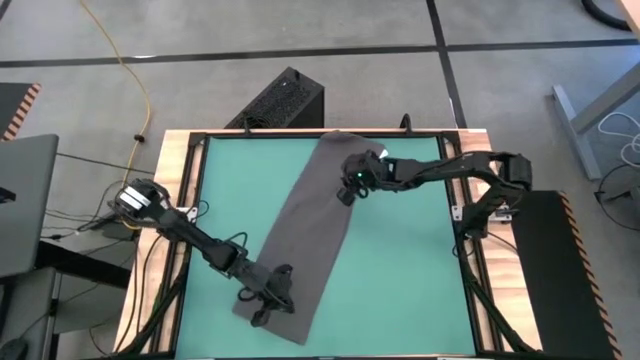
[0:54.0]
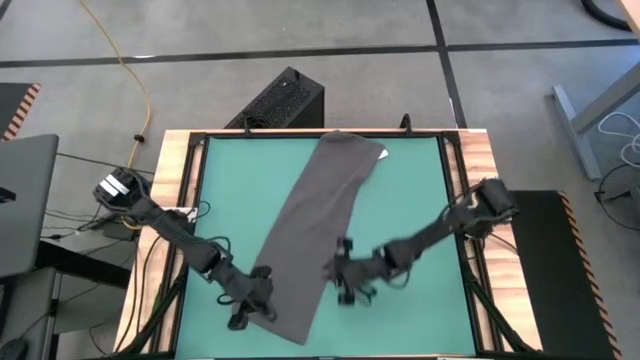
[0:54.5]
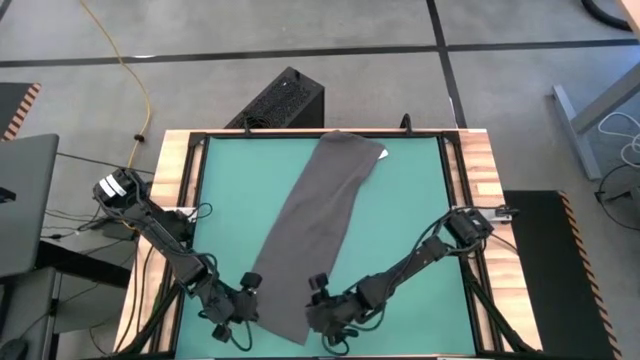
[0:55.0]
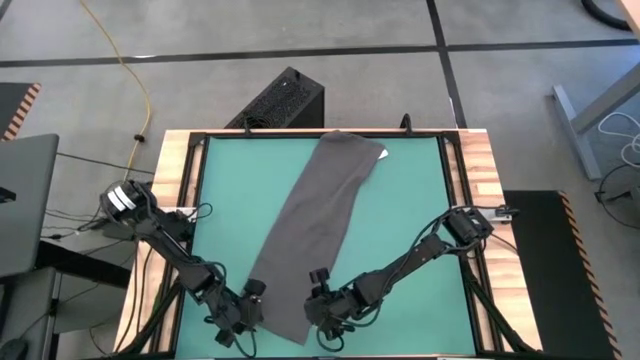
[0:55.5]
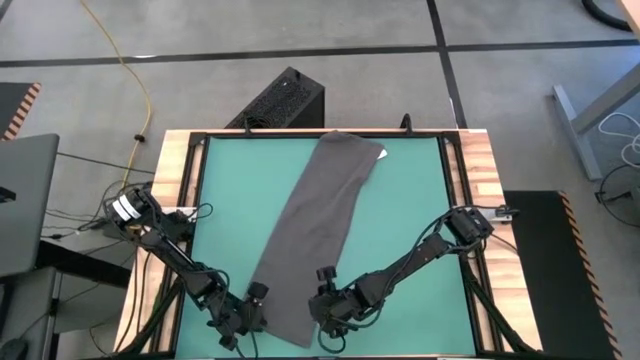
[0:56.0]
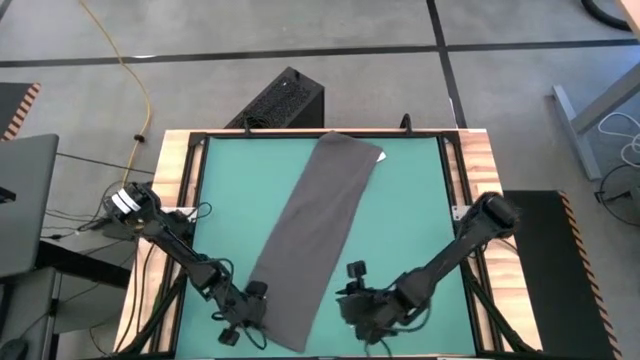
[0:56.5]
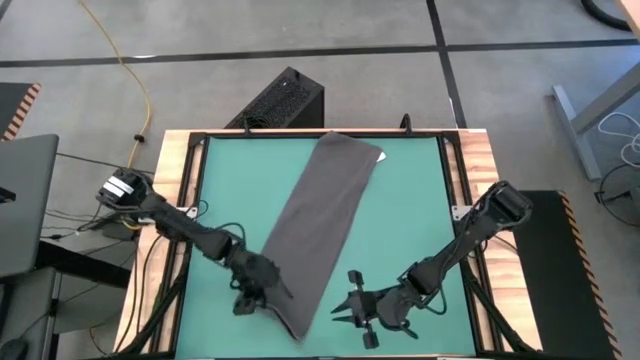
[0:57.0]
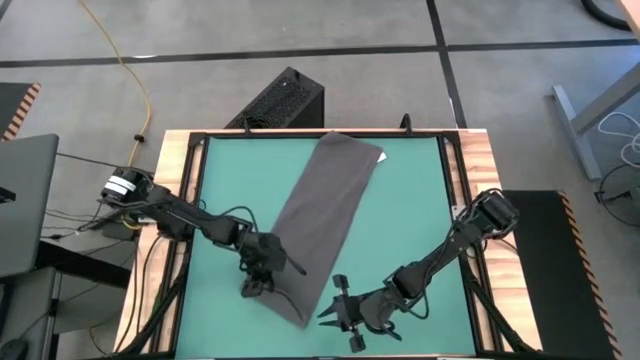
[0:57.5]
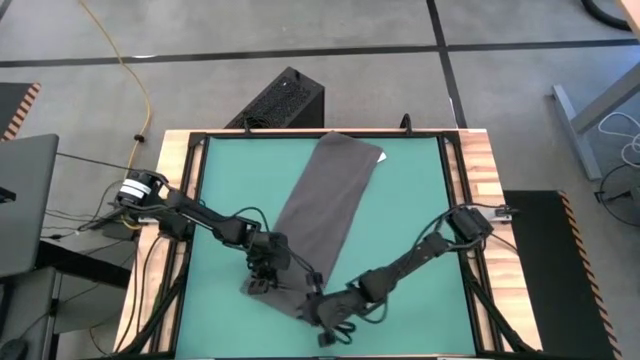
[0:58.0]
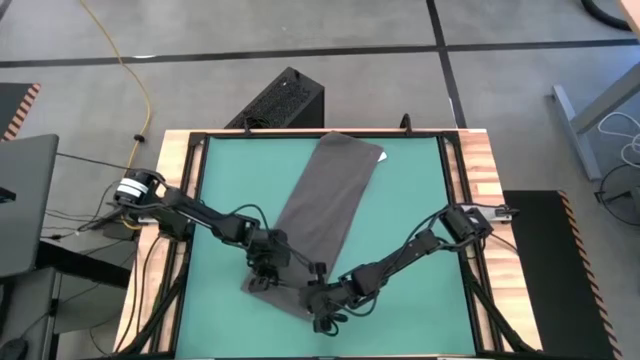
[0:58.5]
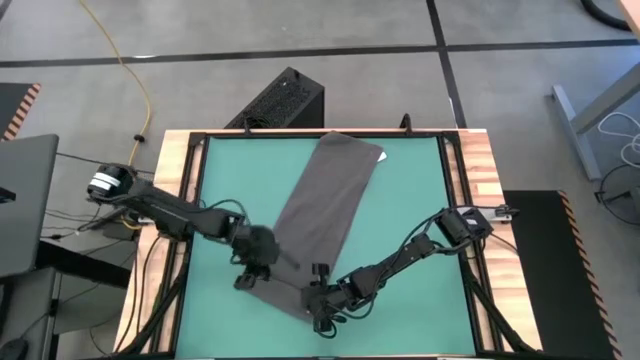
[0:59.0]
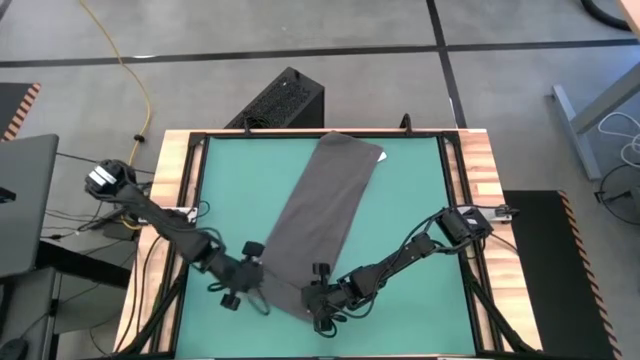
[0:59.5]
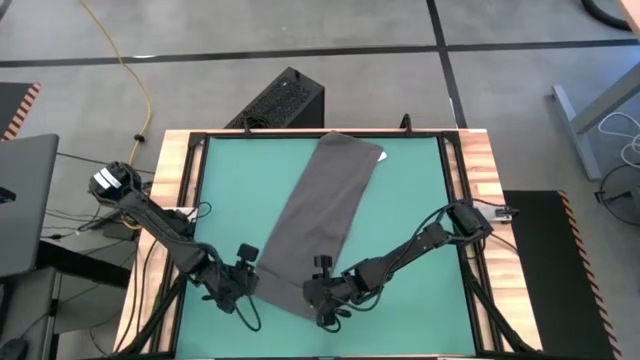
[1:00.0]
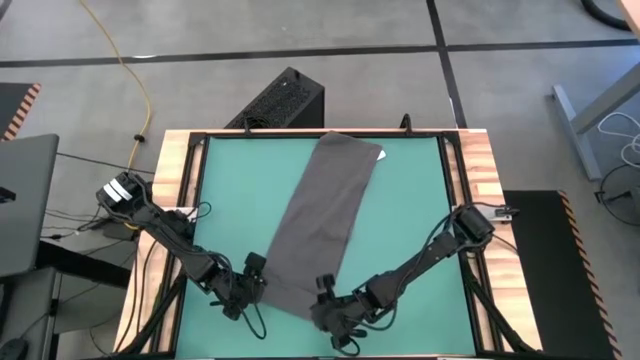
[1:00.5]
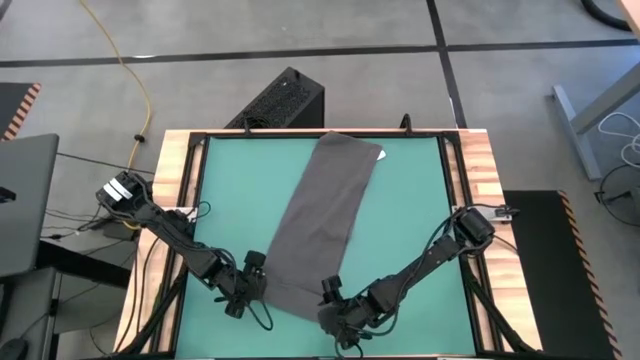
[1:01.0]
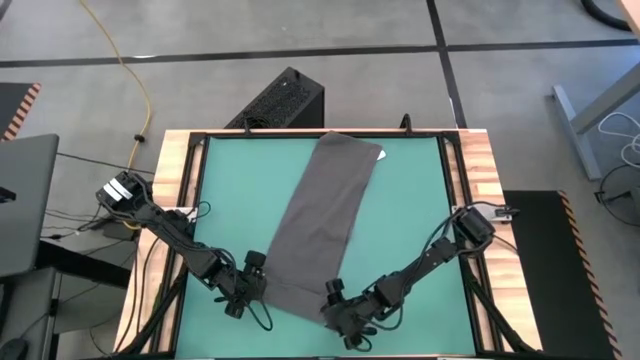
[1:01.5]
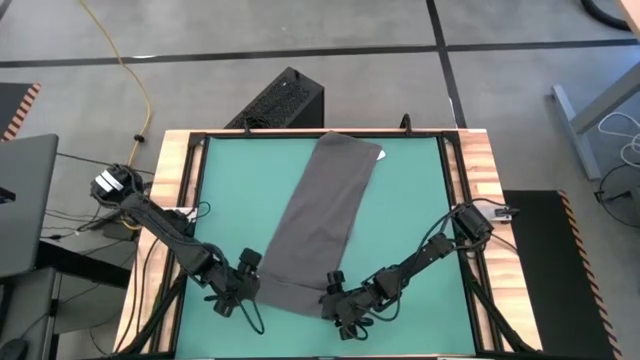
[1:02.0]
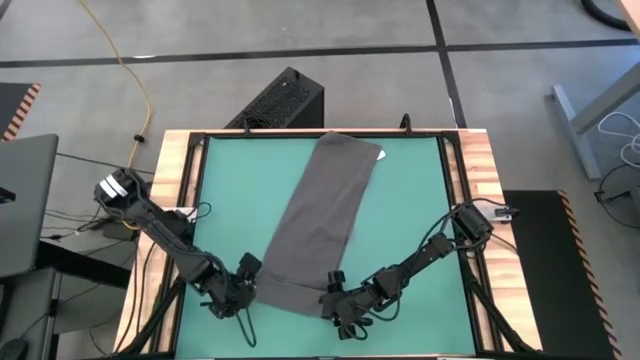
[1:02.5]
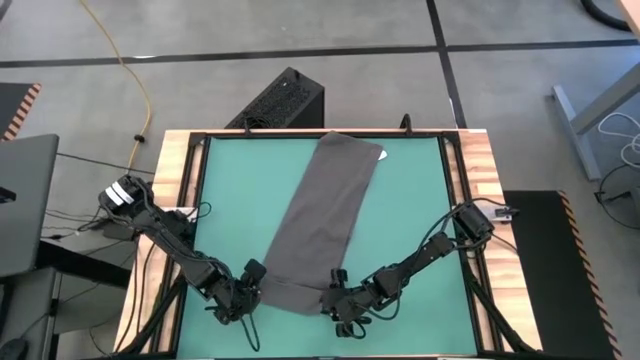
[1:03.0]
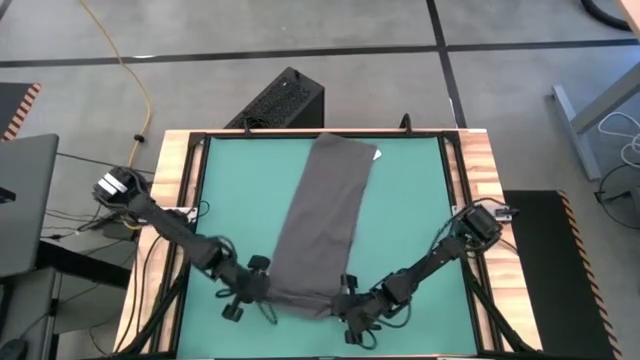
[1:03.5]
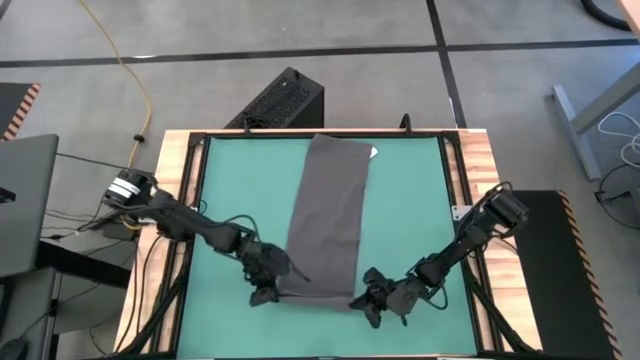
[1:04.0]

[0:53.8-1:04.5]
Task: Roll towel into tight, uniform cylinder
Roll the gray towel

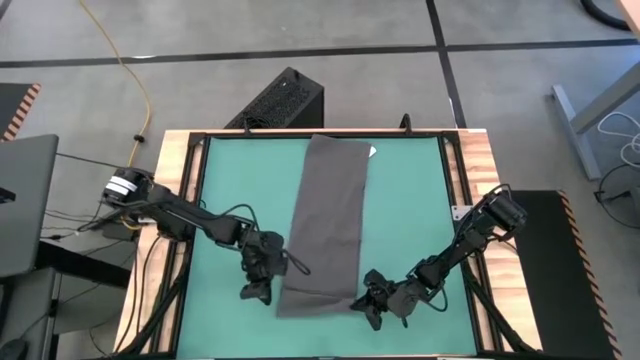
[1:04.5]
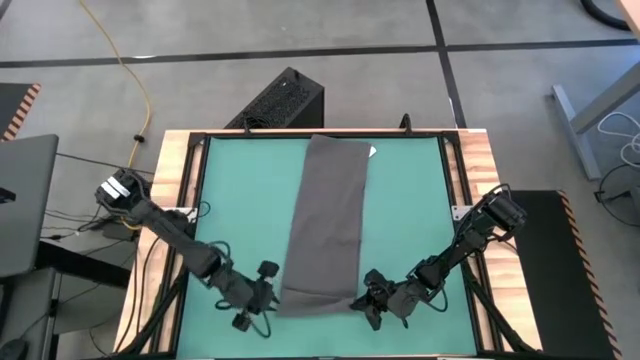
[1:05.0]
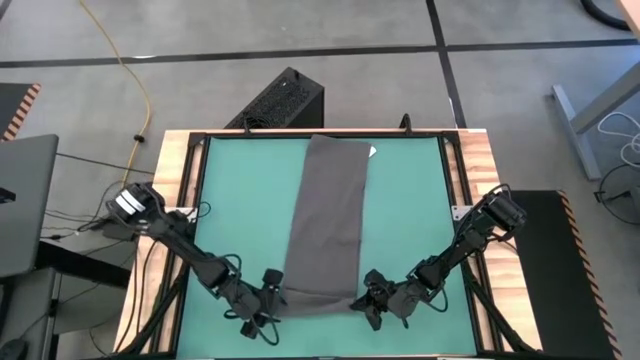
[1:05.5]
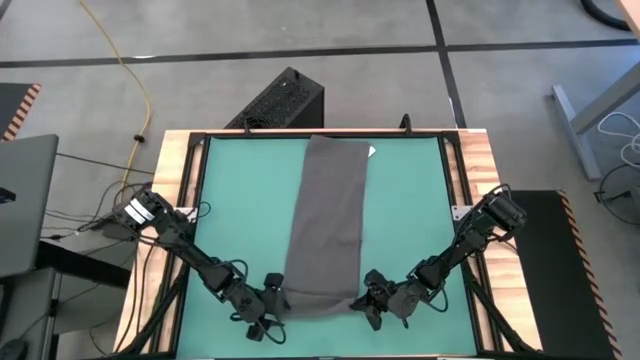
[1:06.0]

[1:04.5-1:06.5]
Roll the gray towel

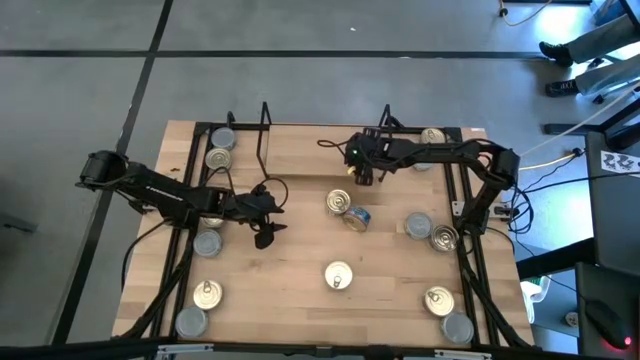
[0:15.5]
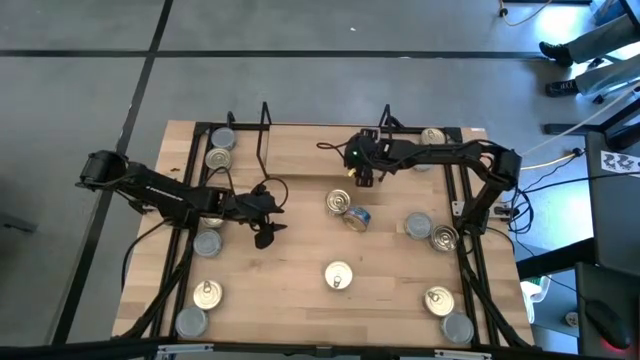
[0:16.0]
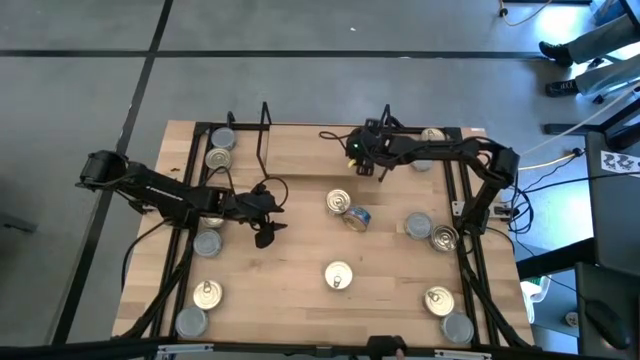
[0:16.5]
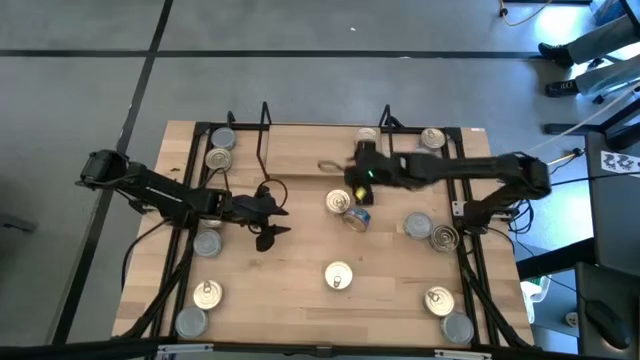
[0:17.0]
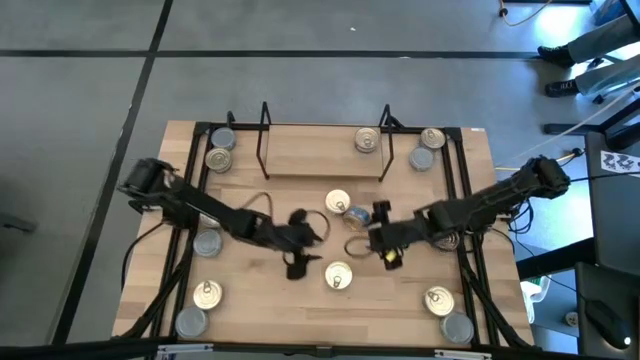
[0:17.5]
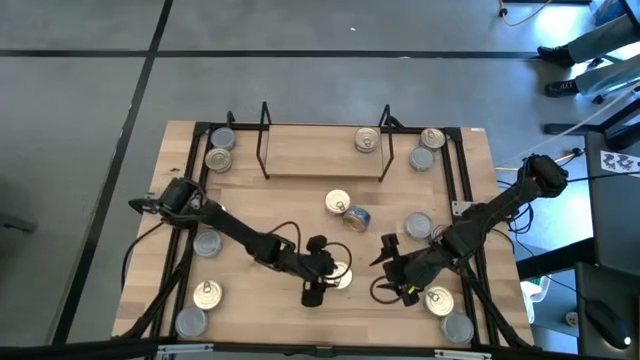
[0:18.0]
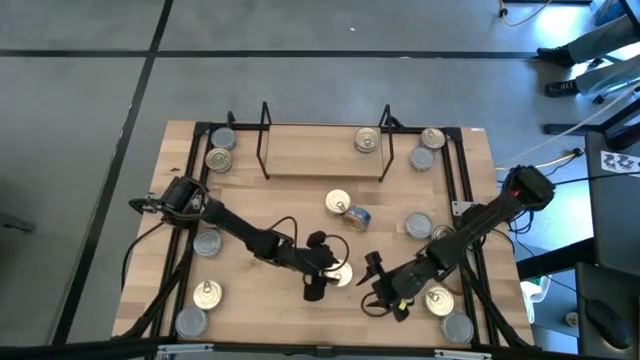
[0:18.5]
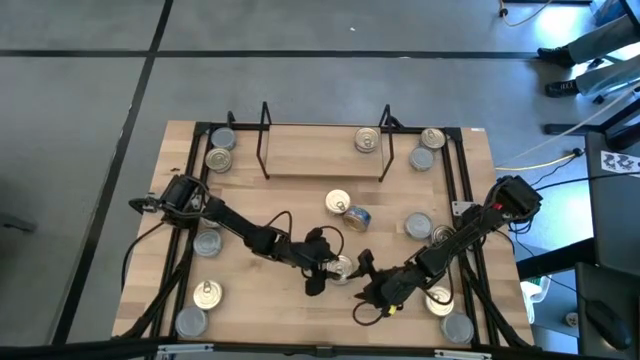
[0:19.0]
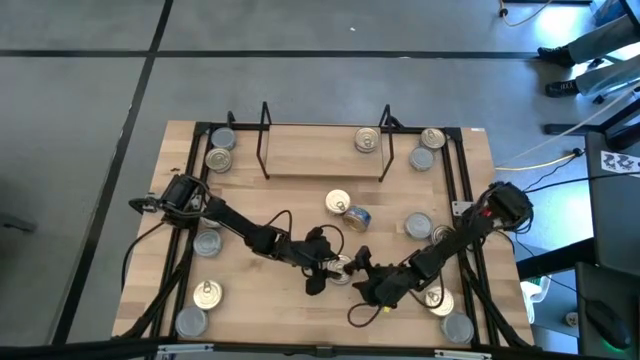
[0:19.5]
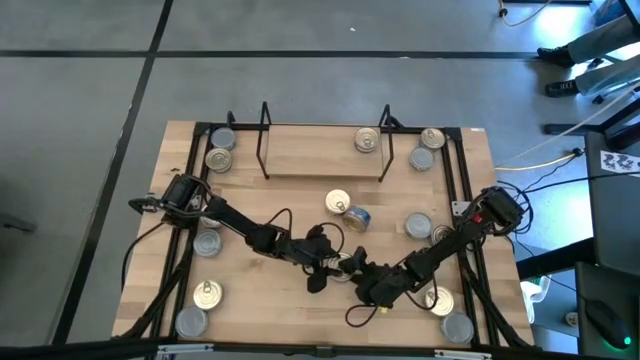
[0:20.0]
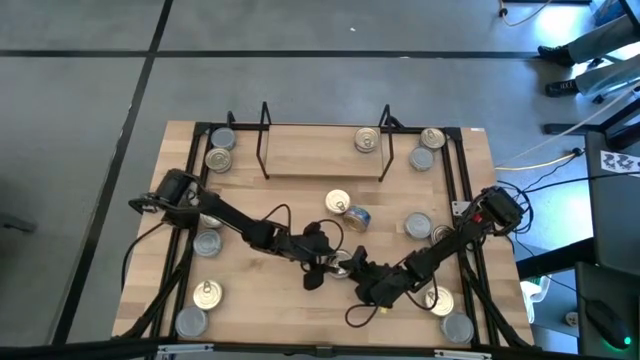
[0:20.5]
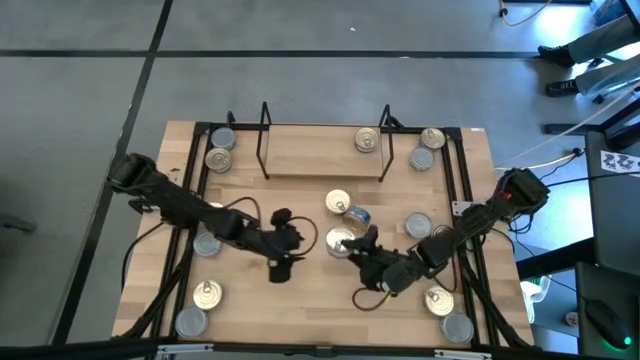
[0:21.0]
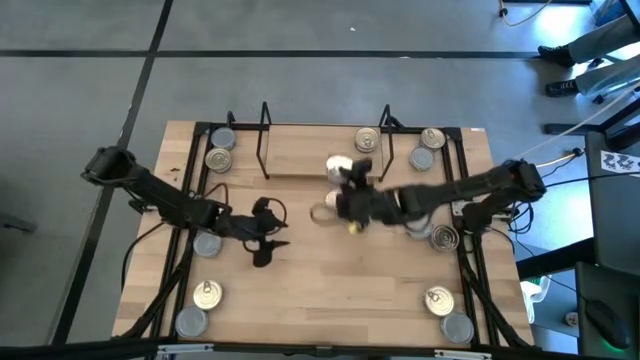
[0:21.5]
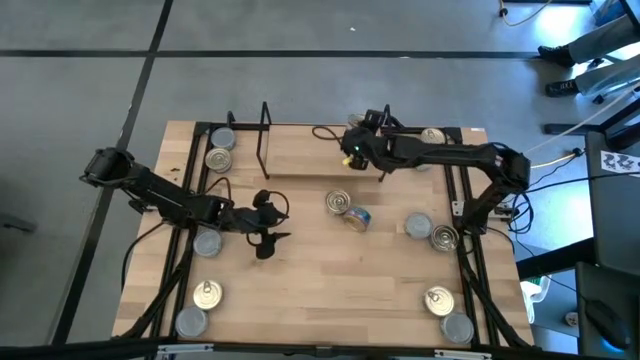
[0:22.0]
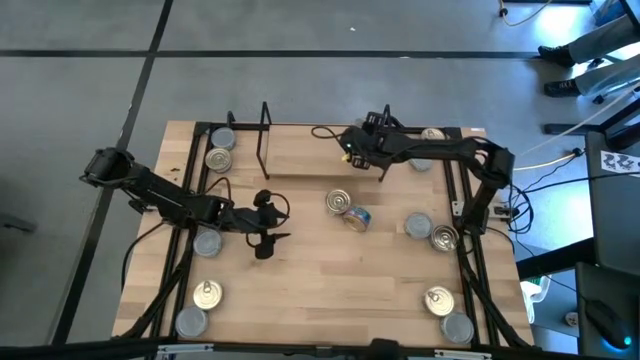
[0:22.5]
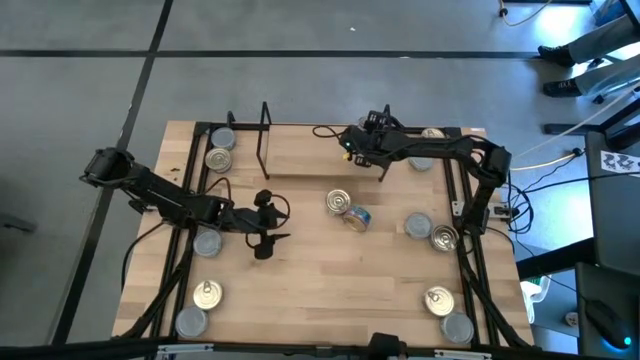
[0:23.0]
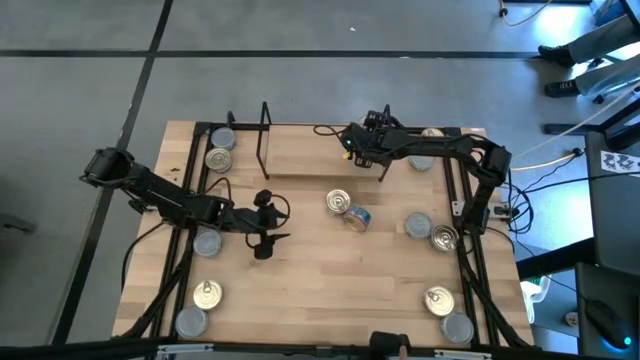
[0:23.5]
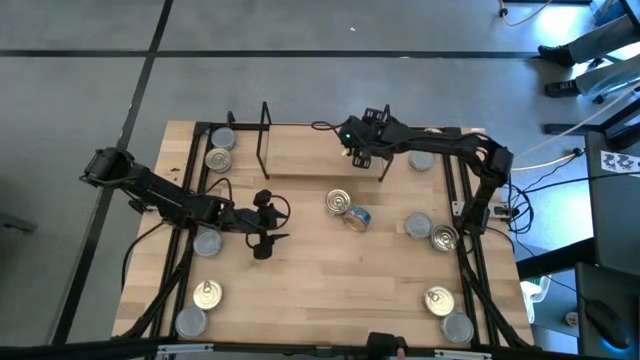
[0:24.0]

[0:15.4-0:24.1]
Task: Stack canned seafood by type on shelf
Stack the blue-pink tuna can on top of the other blue-pink tuna can on the shelf
